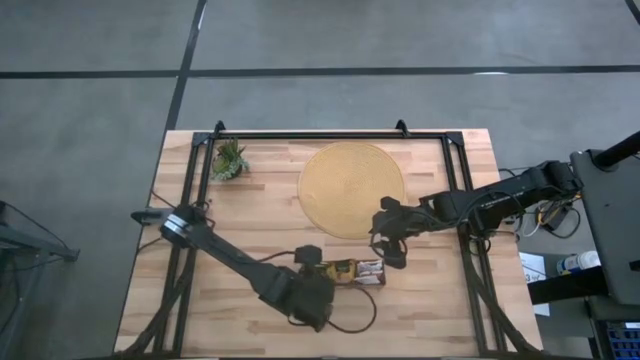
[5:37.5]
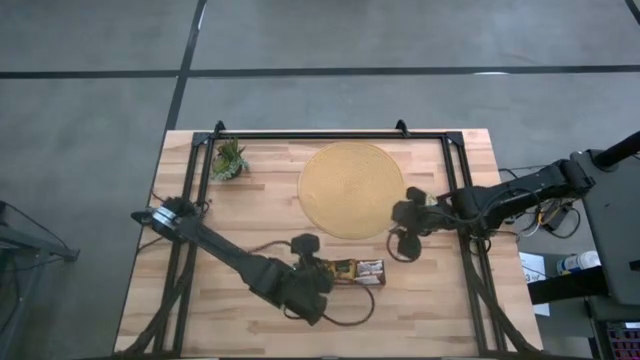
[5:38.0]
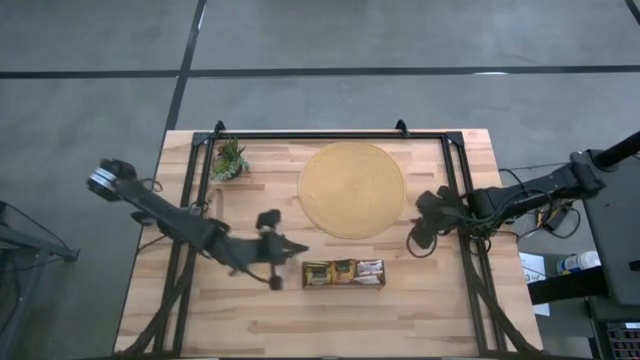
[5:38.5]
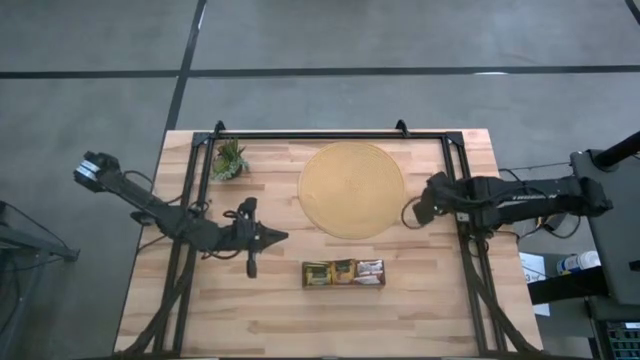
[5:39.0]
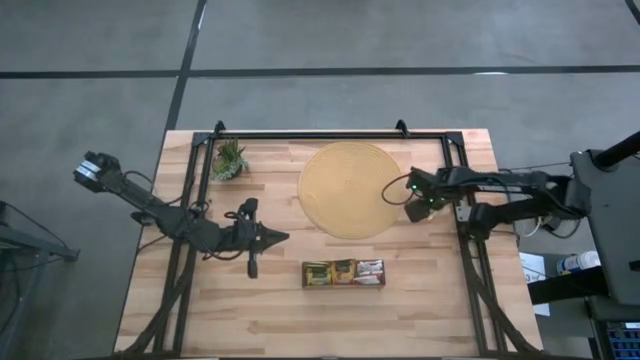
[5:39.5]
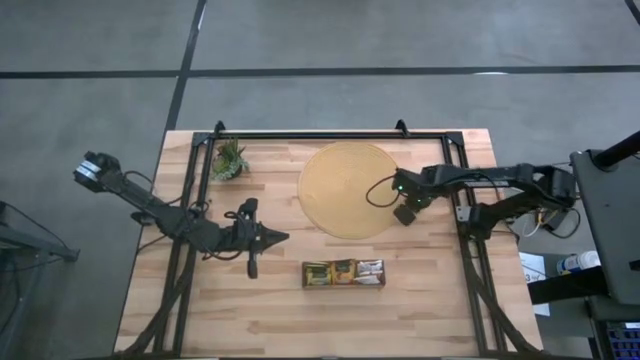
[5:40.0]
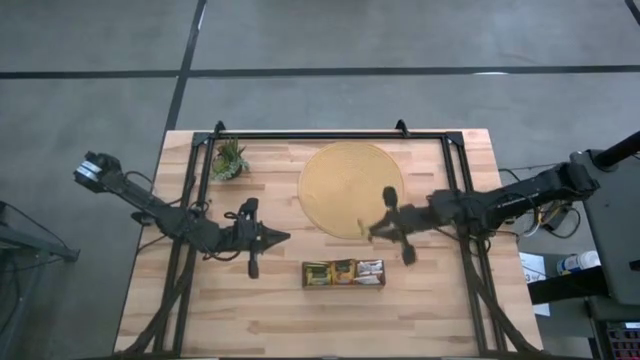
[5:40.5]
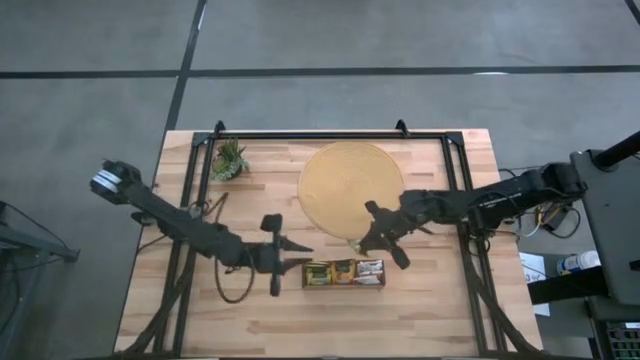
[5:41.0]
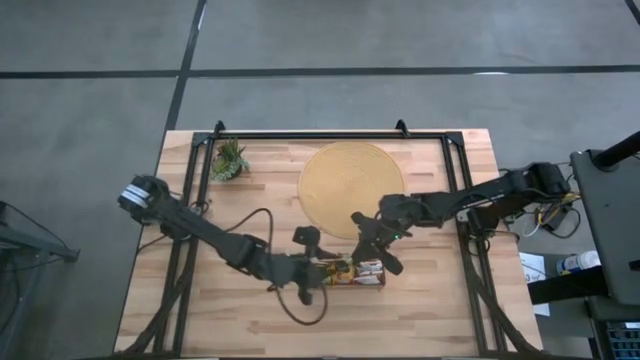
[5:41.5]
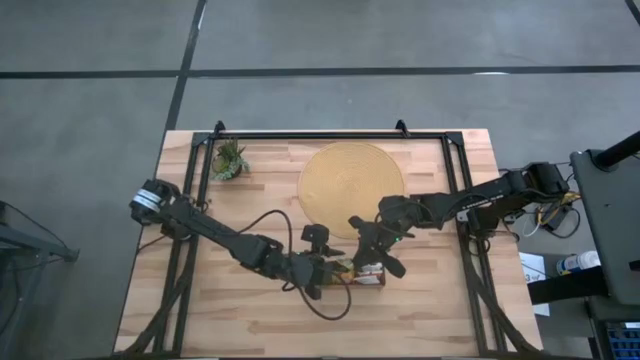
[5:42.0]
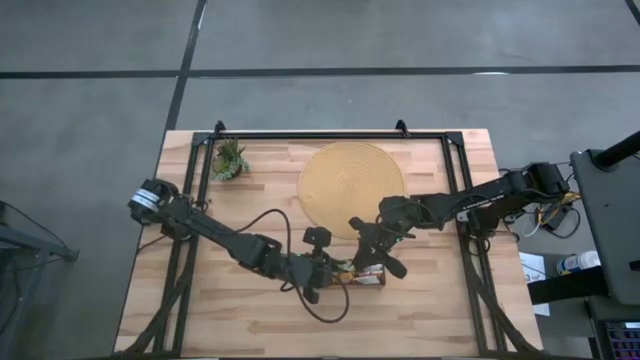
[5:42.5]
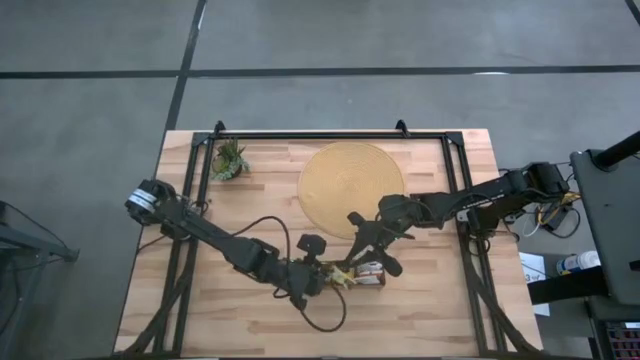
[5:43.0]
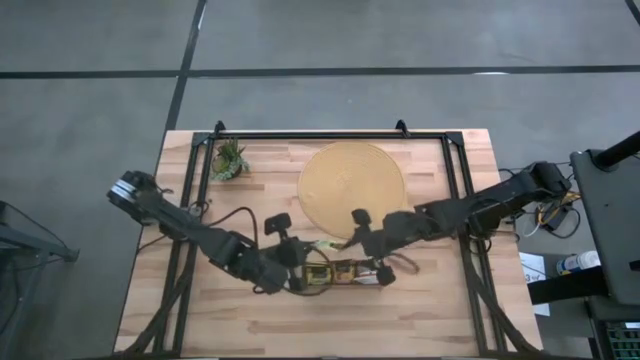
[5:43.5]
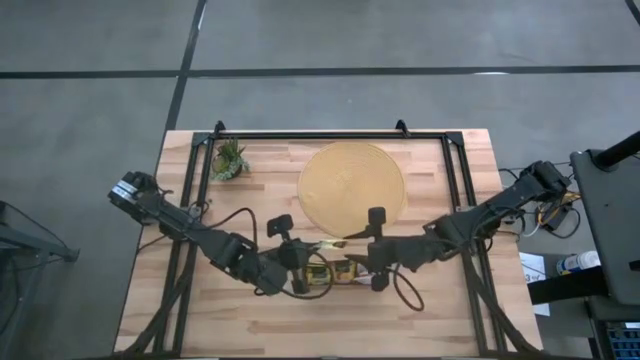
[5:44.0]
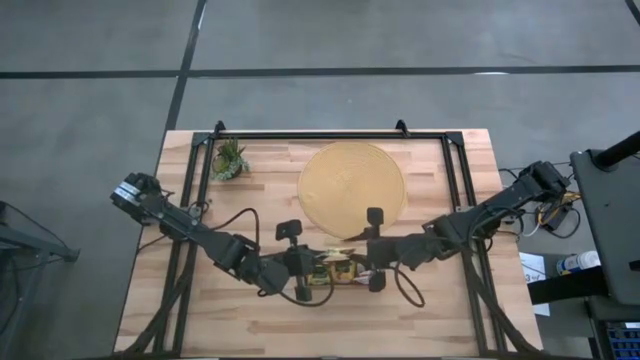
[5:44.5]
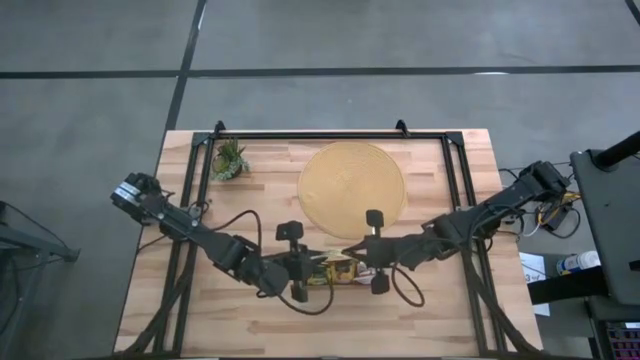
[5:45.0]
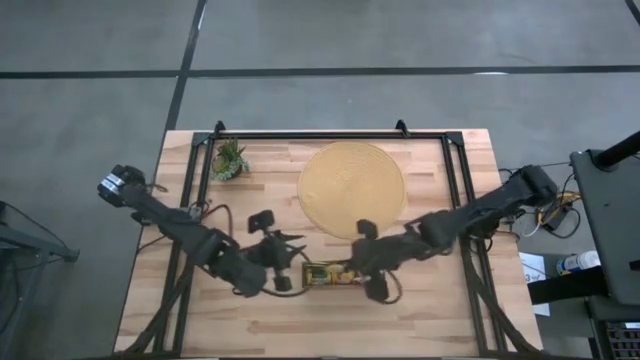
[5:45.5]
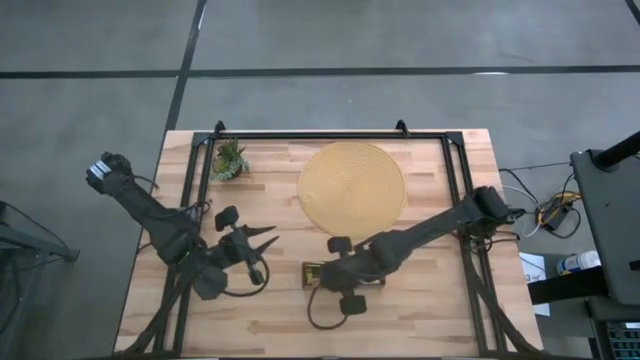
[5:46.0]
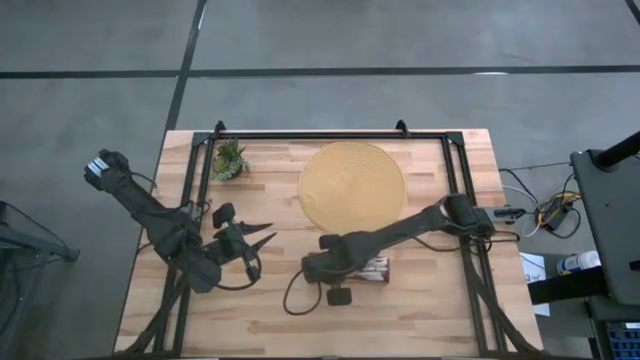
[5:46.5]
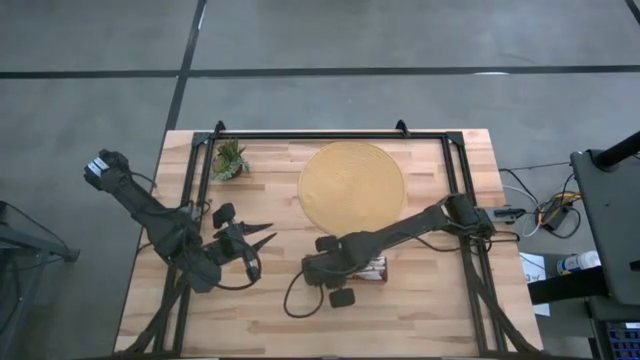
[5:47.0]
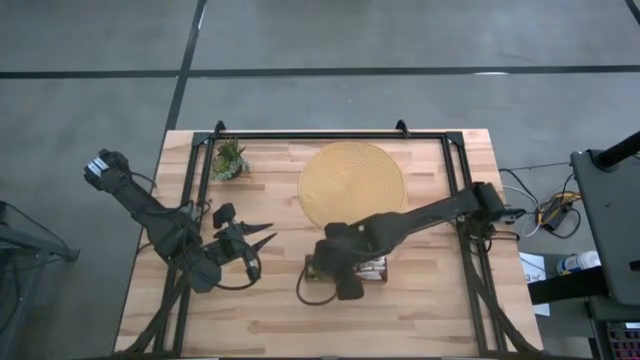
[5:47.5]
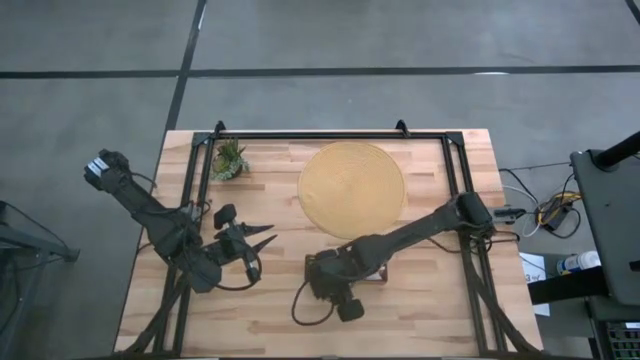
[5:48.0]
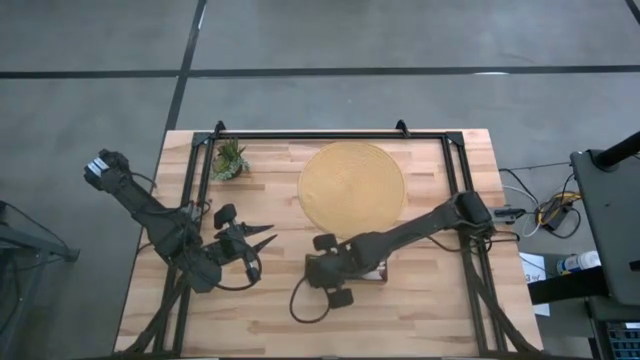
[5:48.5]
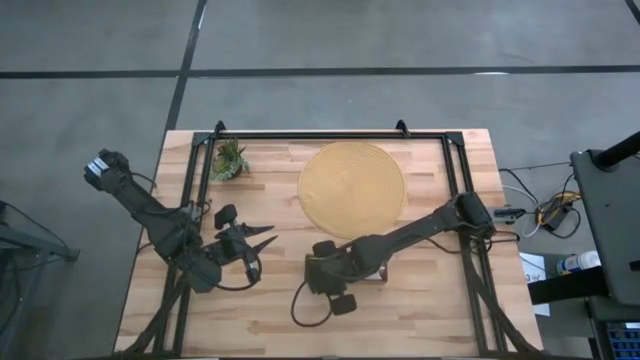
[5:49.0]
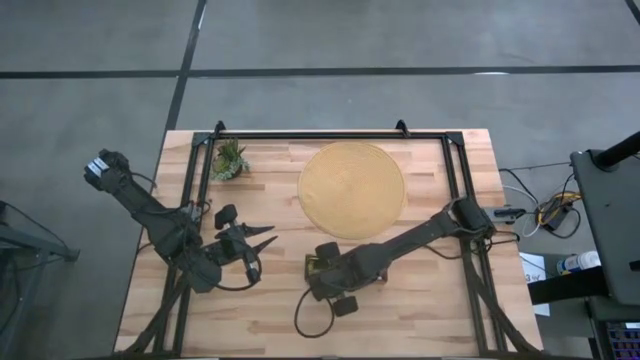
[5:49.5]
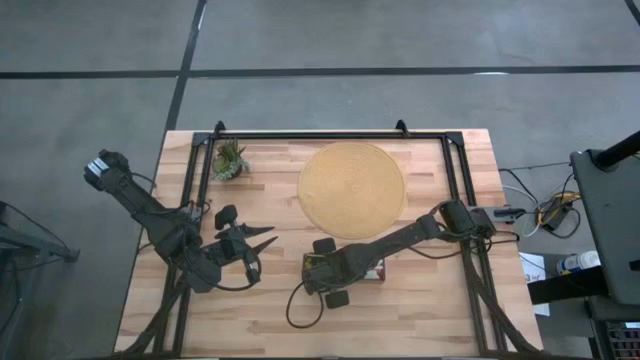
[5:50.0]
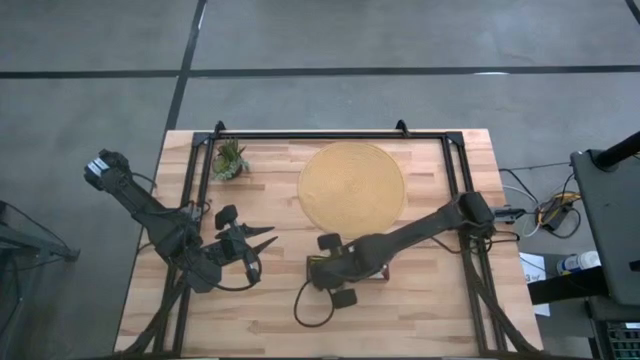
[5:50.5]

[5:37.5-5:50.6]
Task: Pick & Place Tea
Put the yellow tea bag into the left section of the wooden organizer

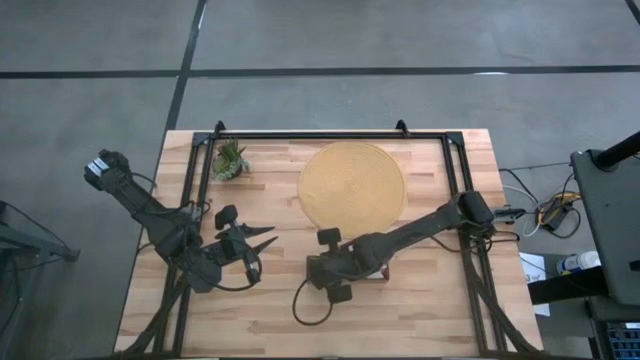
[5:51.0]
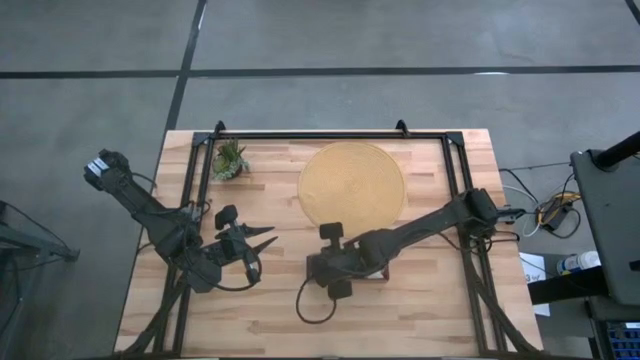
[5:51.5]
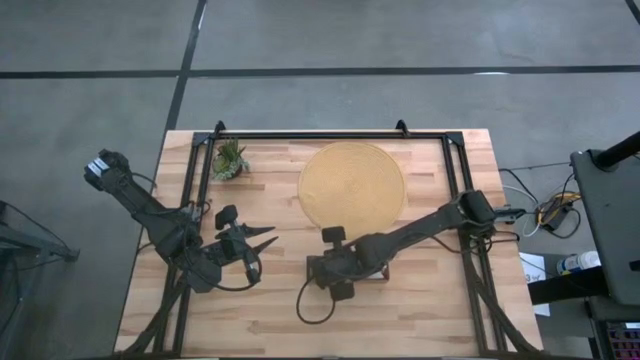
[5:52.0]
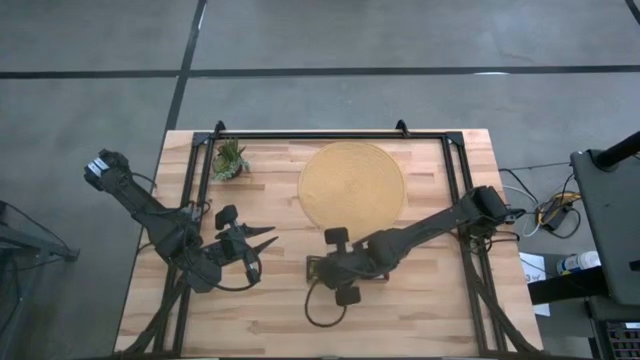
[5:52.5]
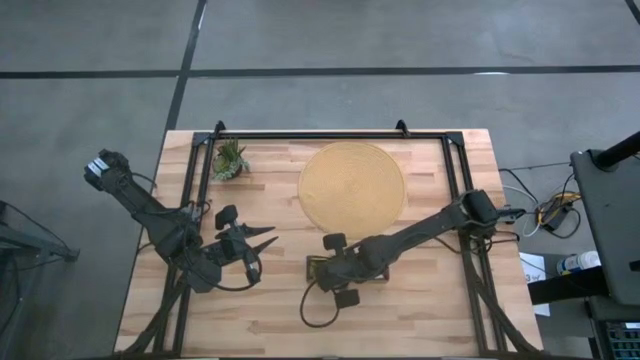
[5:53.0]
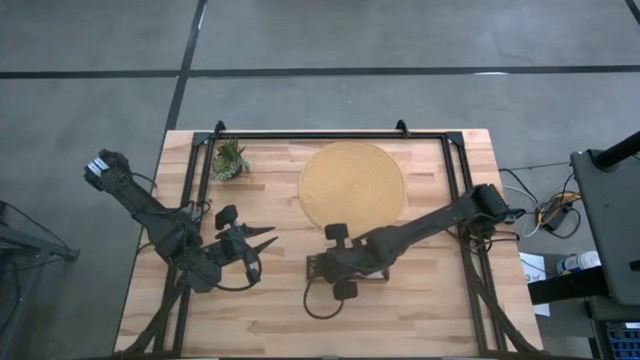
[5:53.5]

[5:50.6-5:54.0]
Adjust the yellow tea bags in the left section of the wooden organizer
